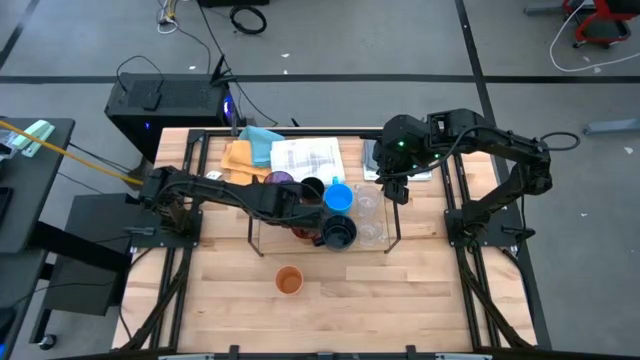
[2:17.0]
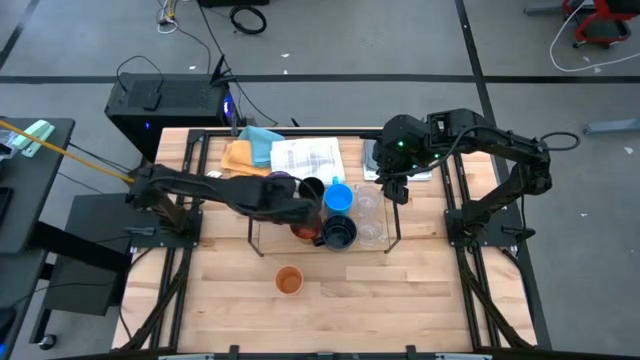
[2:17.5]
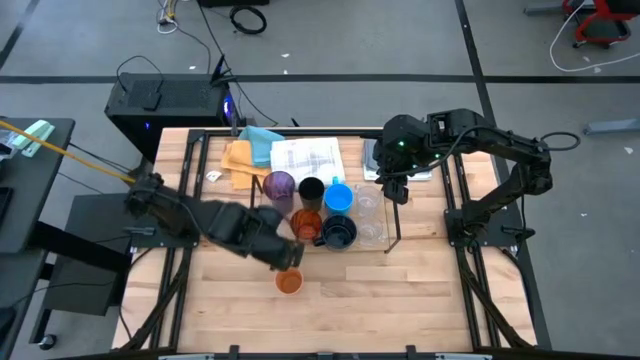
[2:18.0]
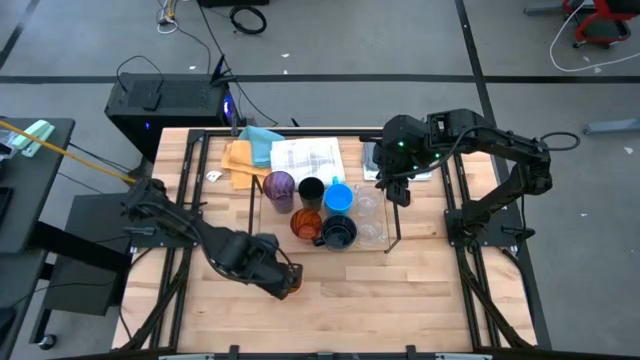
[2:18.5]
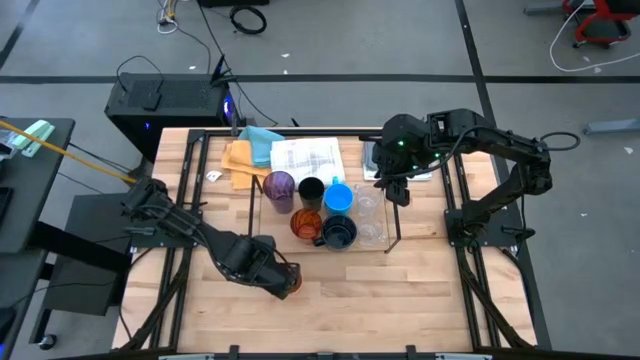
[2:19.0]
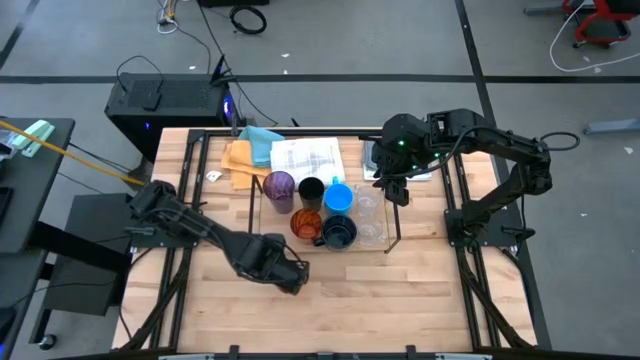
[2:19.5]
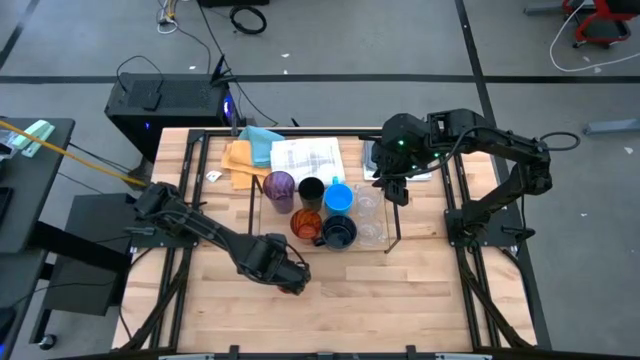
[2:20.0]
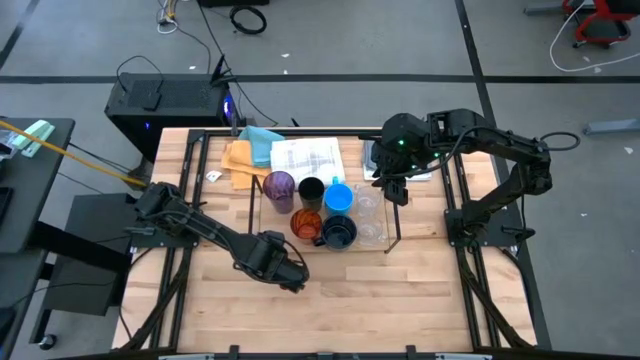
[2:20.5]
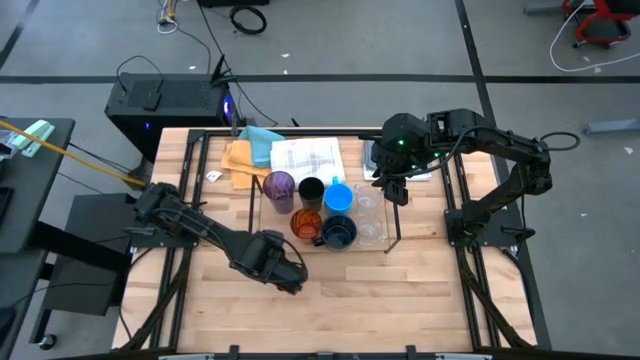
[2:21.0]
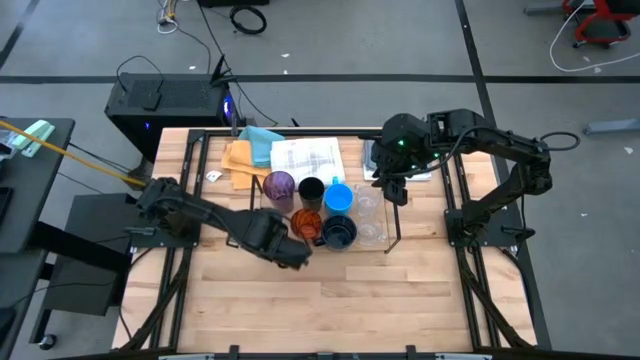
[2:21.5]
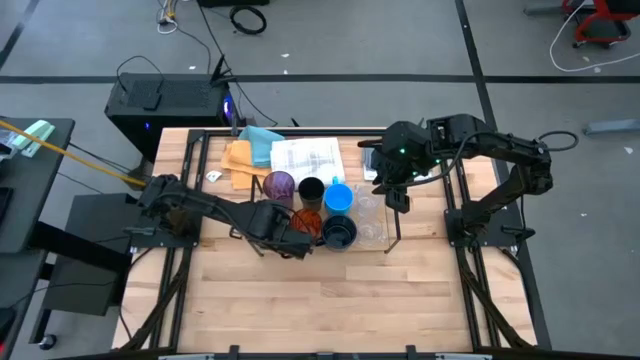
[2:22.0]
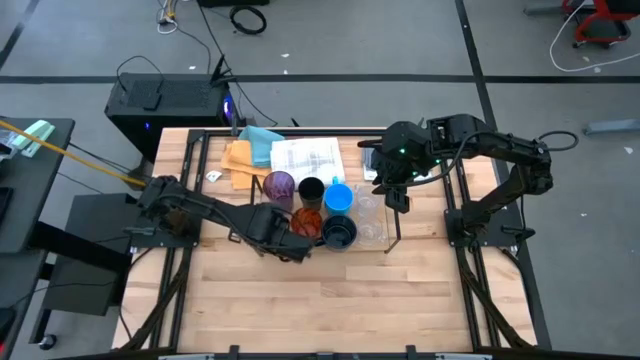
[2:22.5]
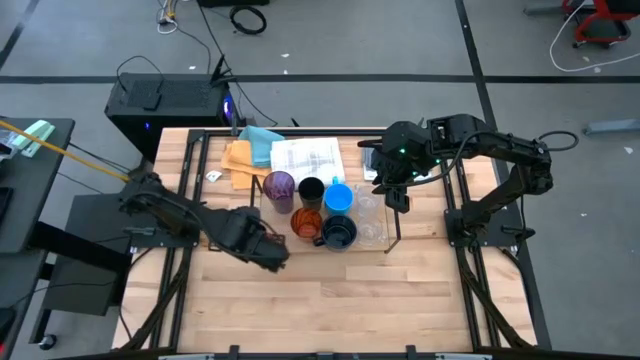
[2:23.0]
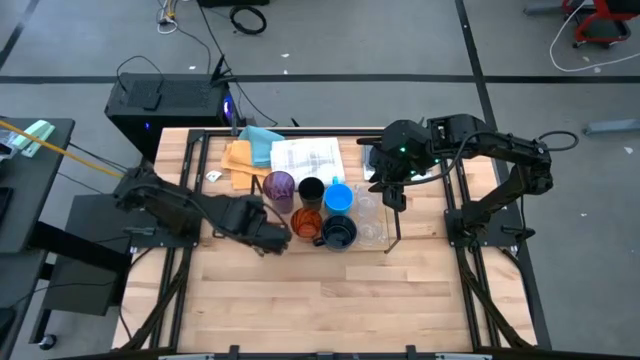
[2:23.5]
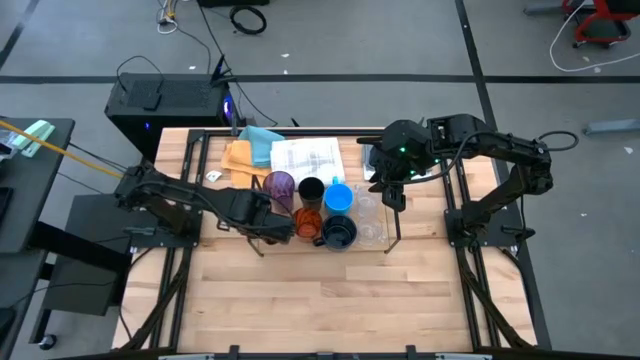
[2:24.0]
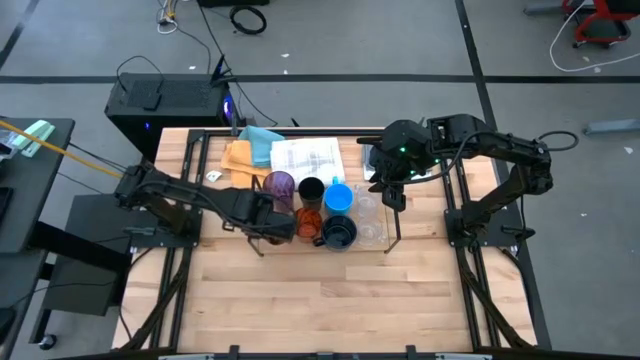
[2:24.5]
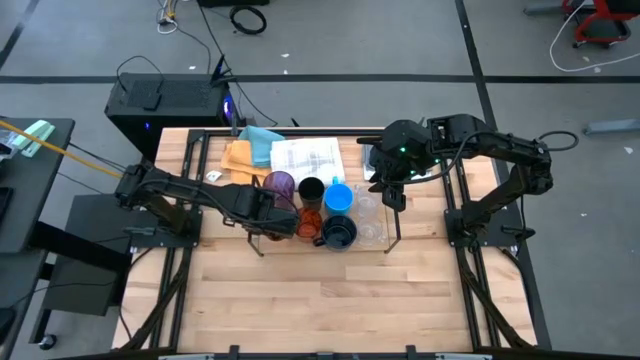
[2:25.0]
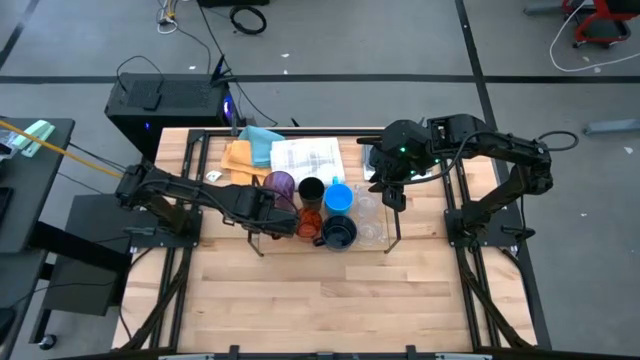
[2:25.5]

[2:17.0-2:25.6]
Task: Stack small to large cups/mugs on shelf
Put the orange cup on the shelf

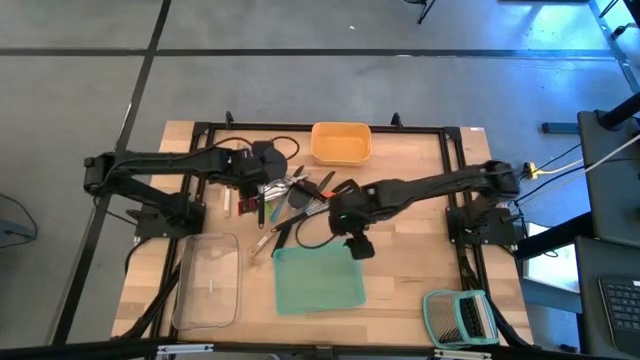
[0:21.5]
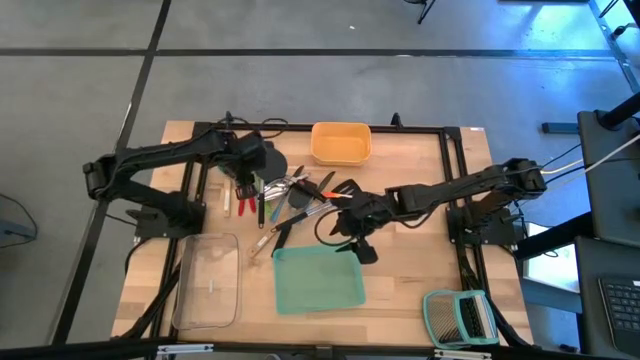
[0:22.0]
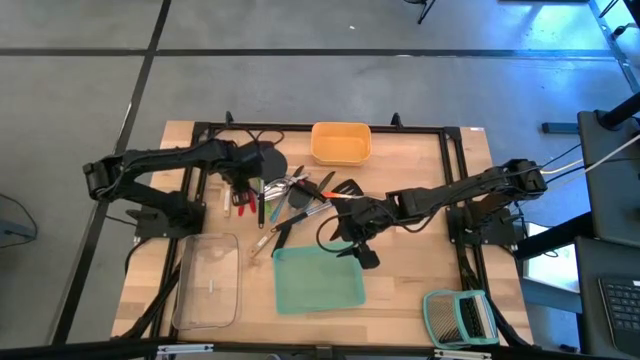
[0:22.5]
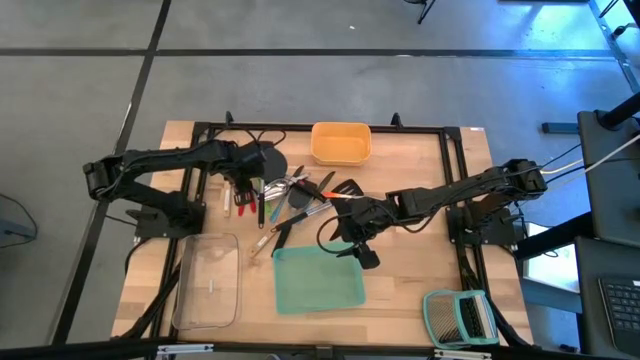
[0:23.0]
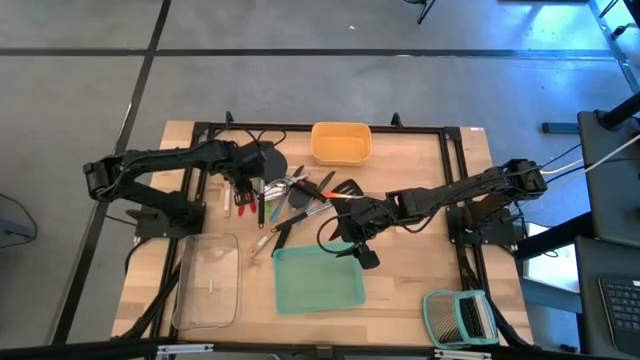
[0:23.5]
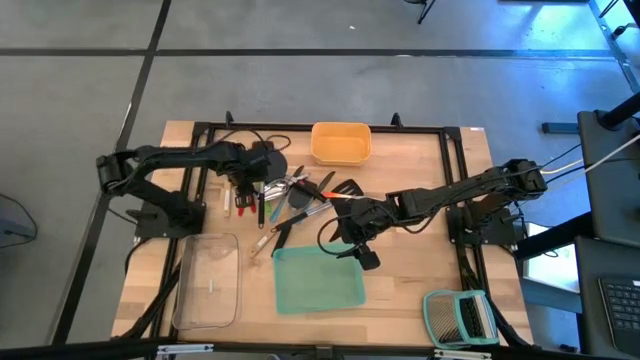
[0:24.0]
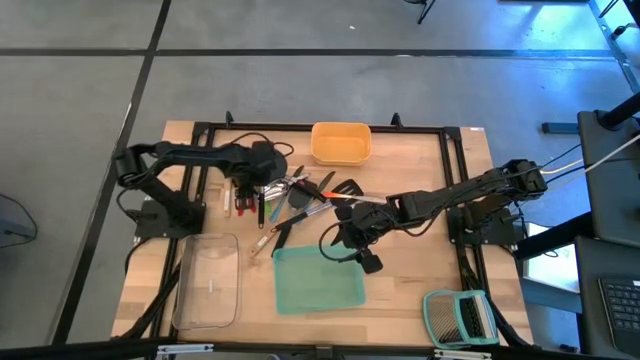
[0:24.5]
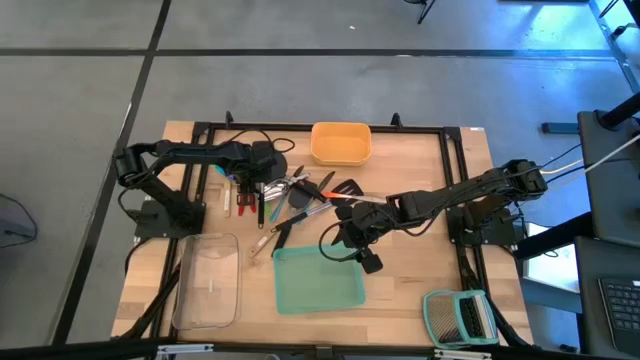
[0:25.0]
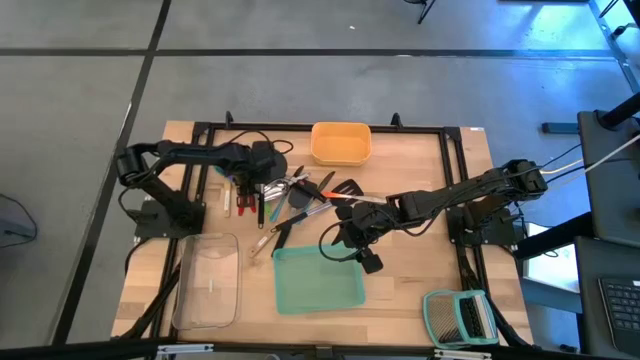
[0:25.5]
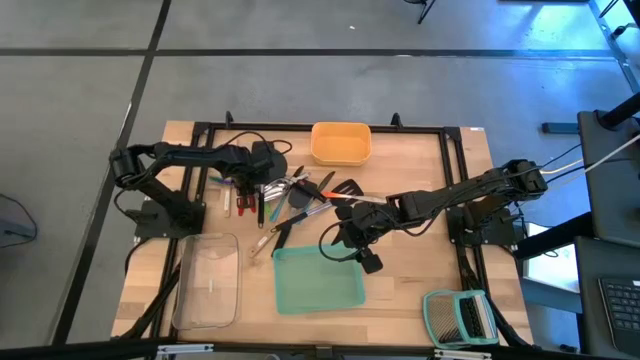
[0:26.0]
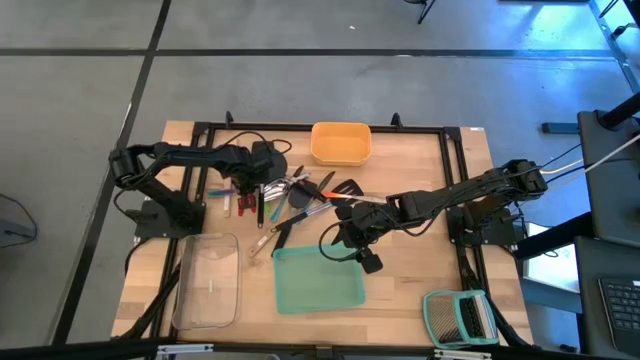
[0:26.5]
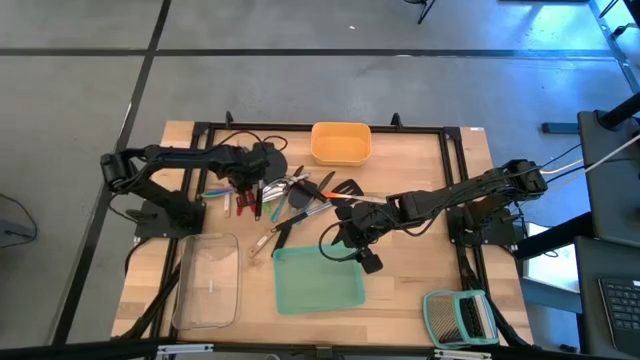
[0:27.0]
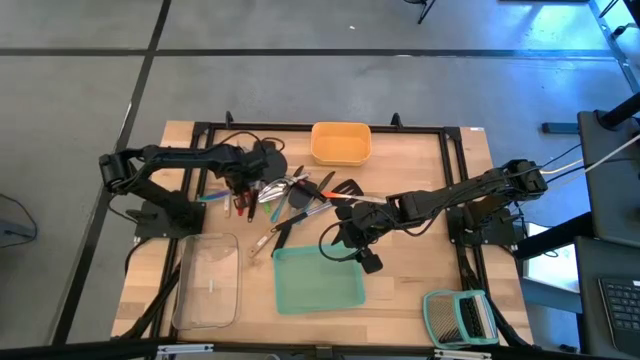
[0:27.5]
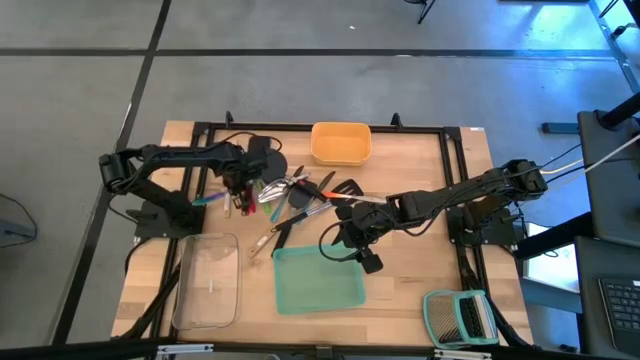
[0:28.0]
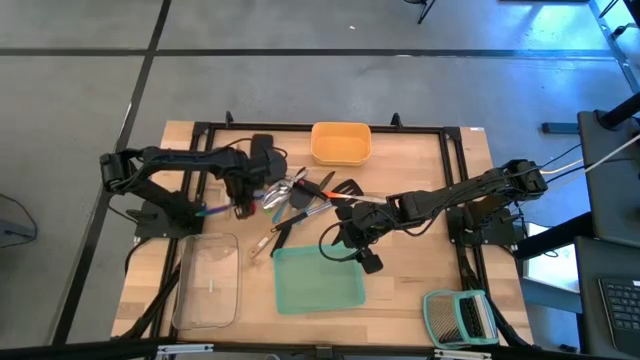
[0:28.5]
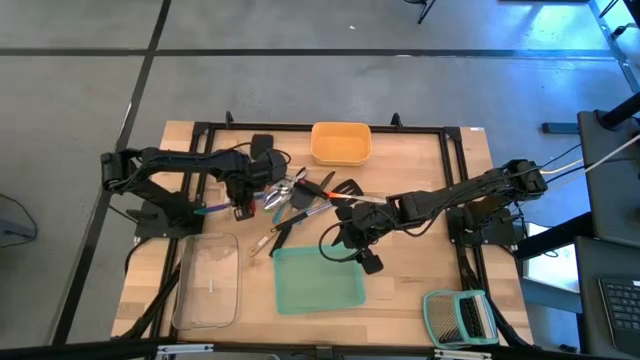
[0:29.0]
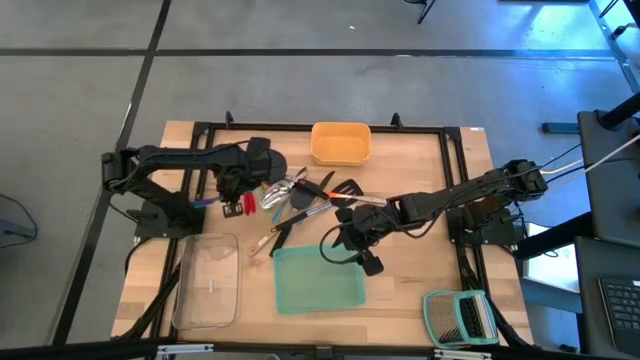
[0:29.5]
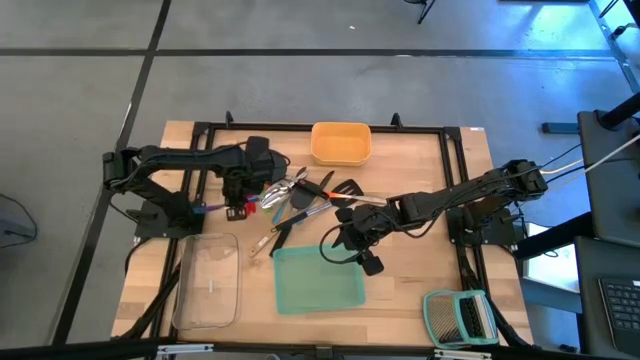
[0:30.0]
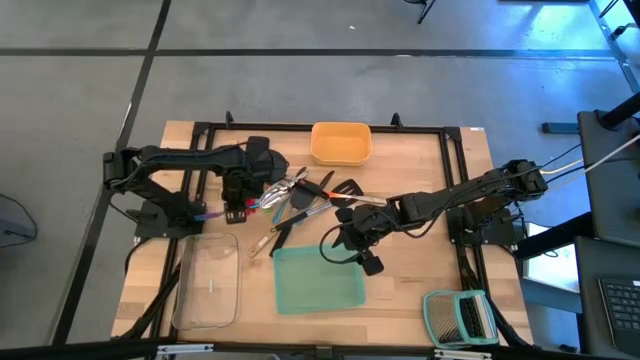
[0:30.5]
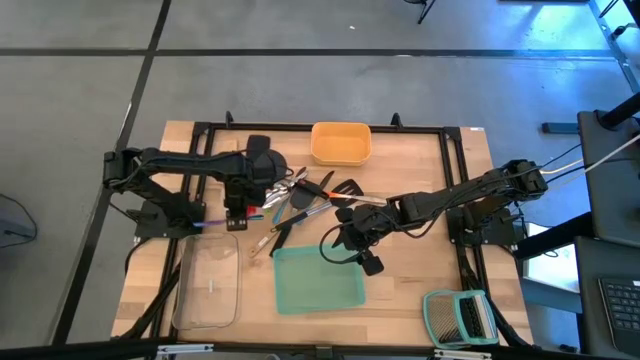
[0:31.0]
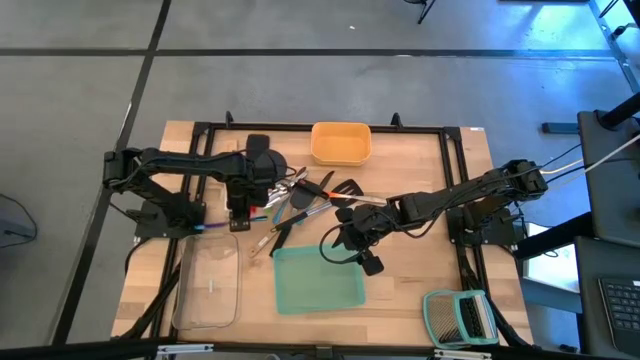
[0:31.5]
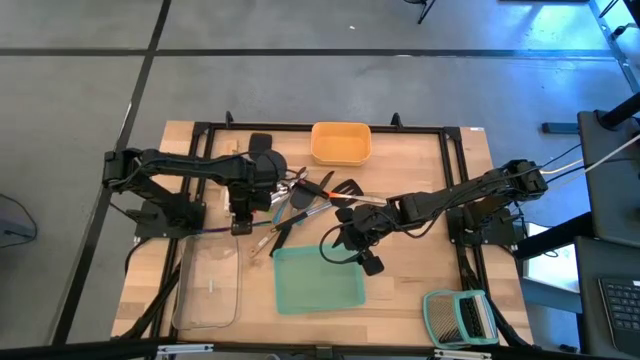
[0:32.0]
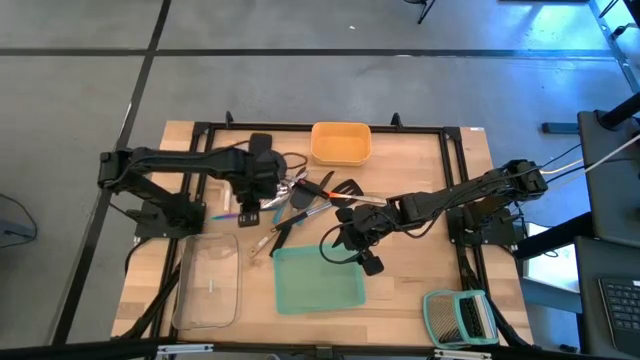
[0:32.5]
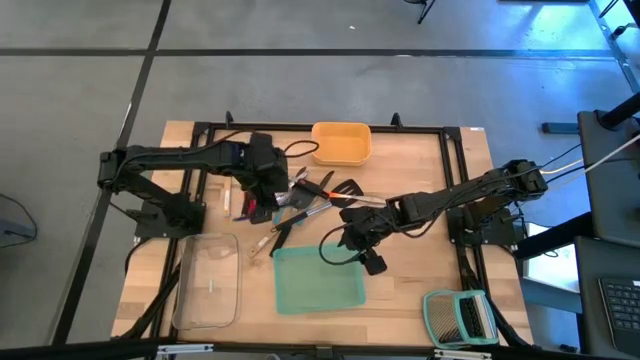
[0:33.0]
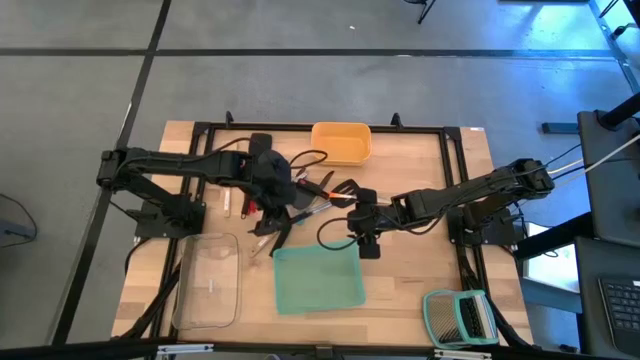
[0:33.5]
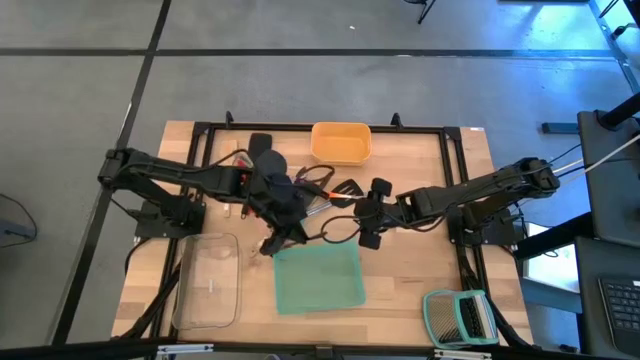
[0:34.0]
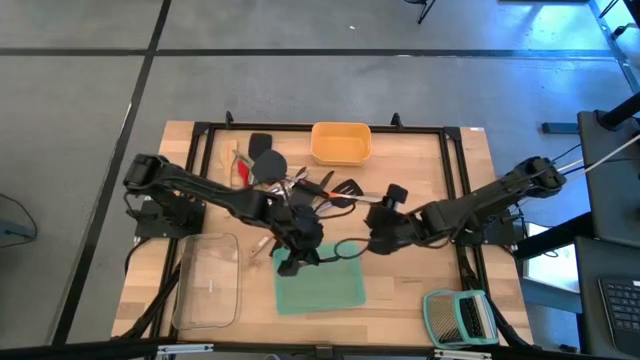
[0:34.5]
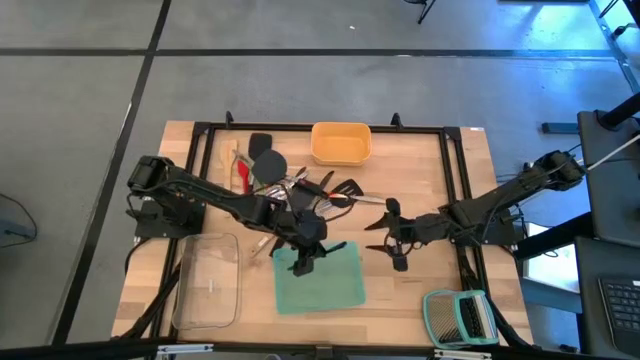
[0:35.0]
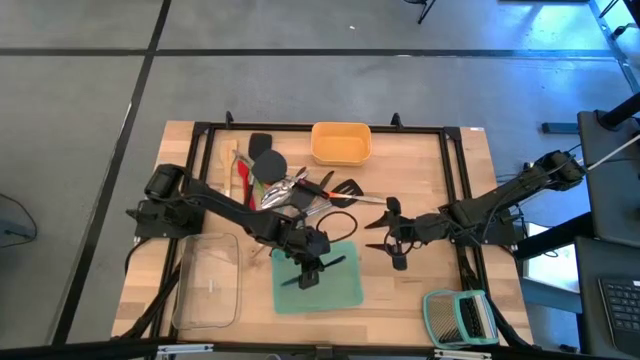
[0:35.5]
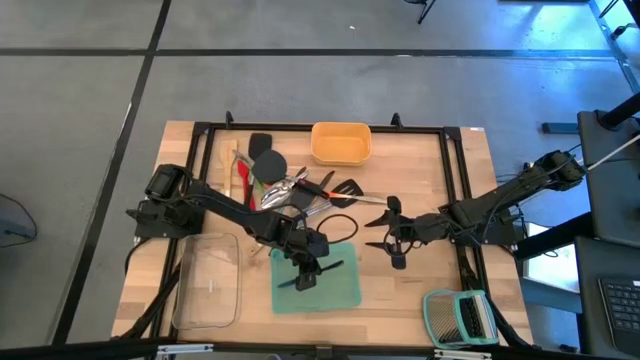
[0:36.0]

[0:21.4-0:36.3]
Task: Pick & Place Kitchen Items
Put the violet table knife into the green bin
